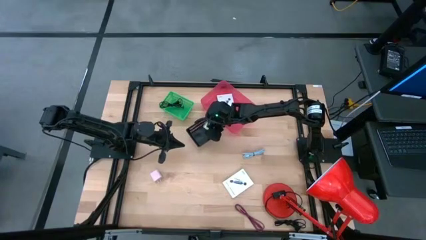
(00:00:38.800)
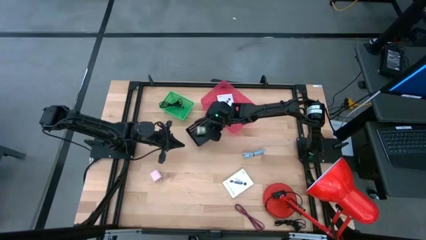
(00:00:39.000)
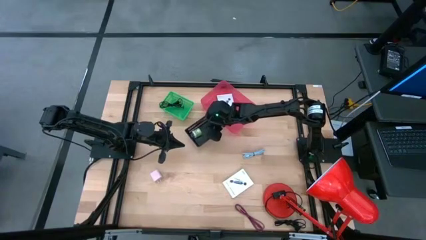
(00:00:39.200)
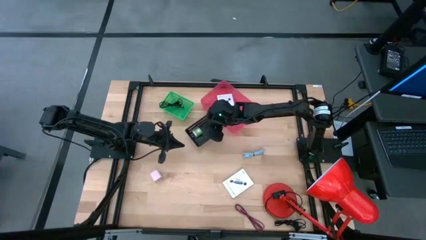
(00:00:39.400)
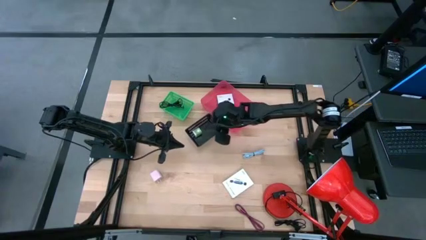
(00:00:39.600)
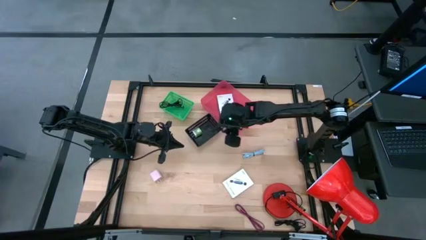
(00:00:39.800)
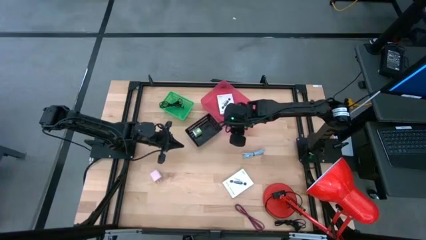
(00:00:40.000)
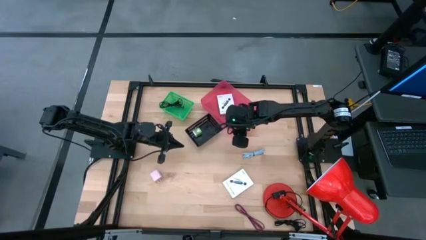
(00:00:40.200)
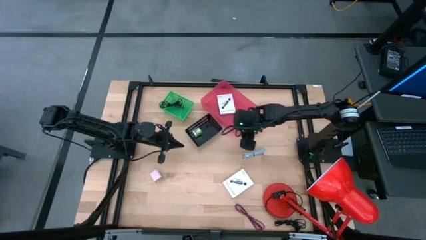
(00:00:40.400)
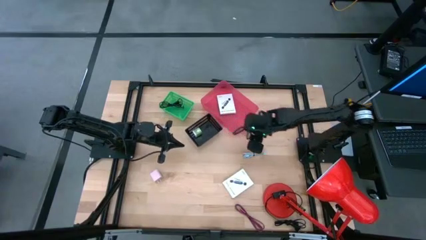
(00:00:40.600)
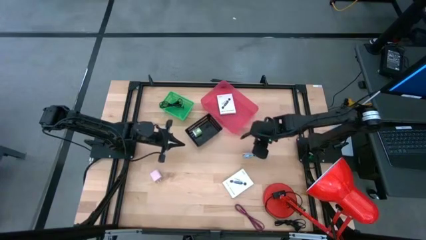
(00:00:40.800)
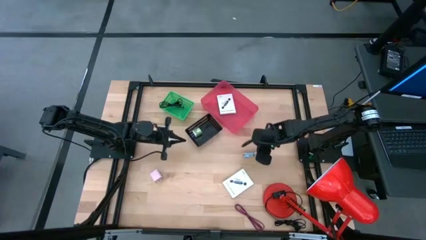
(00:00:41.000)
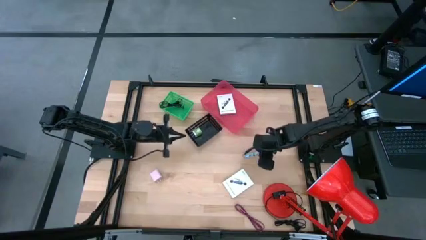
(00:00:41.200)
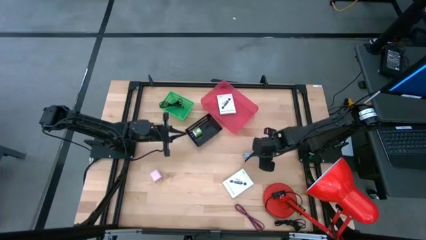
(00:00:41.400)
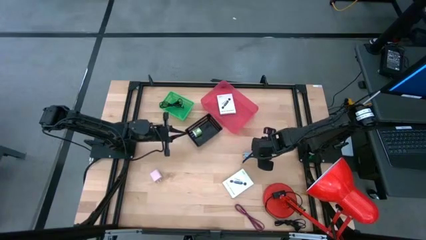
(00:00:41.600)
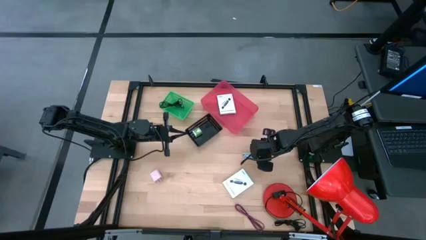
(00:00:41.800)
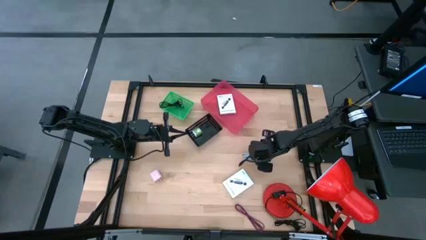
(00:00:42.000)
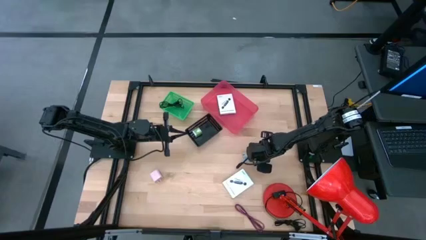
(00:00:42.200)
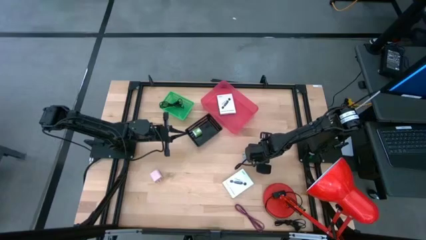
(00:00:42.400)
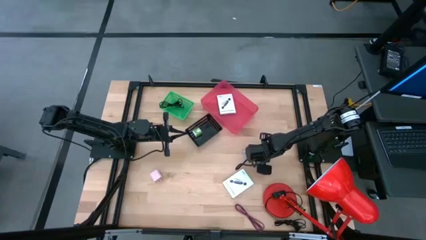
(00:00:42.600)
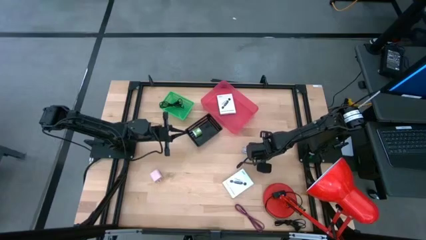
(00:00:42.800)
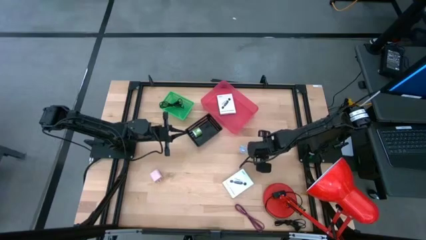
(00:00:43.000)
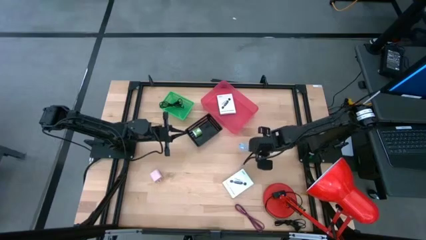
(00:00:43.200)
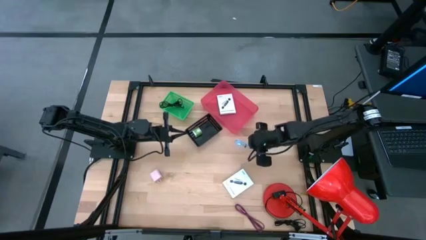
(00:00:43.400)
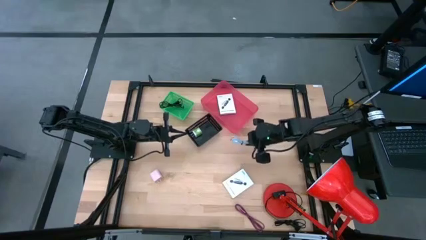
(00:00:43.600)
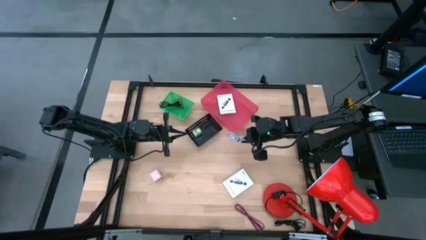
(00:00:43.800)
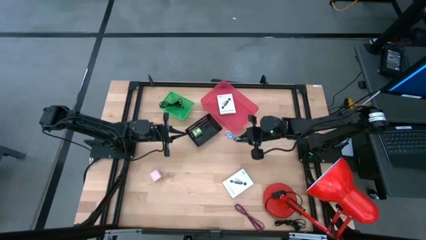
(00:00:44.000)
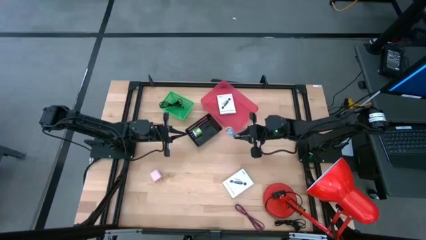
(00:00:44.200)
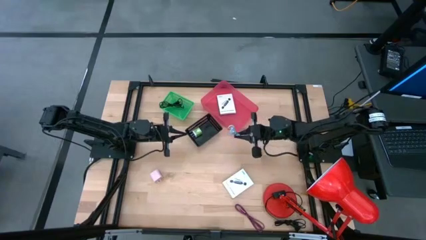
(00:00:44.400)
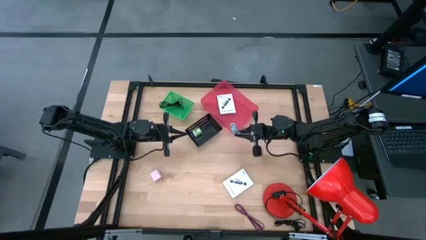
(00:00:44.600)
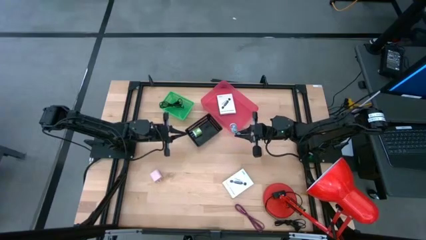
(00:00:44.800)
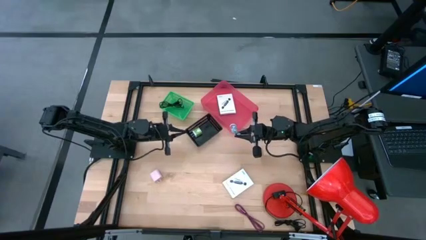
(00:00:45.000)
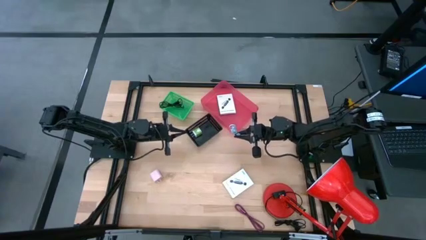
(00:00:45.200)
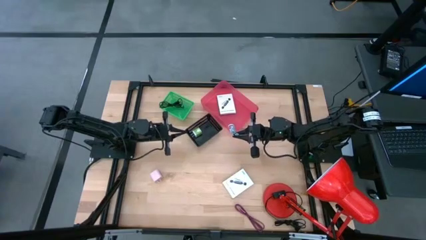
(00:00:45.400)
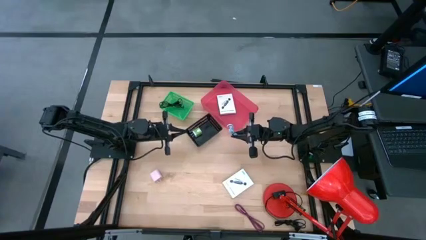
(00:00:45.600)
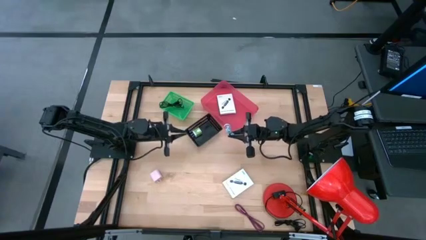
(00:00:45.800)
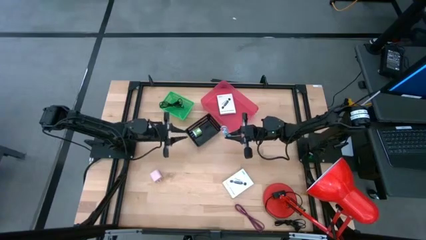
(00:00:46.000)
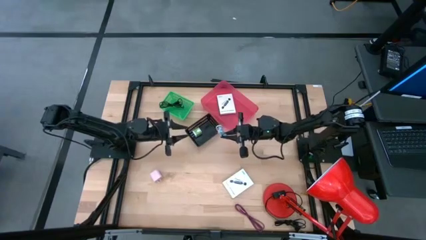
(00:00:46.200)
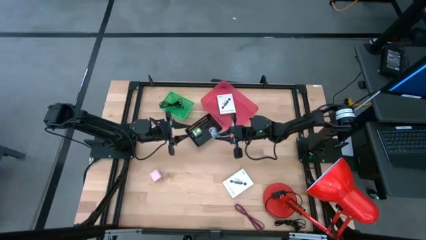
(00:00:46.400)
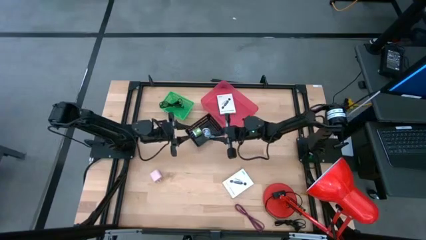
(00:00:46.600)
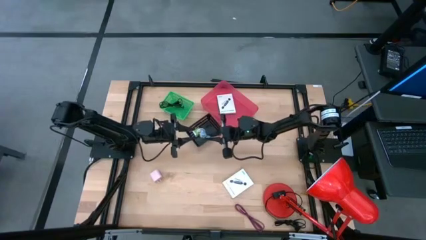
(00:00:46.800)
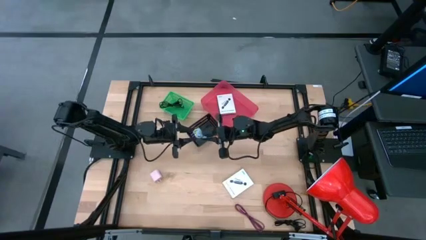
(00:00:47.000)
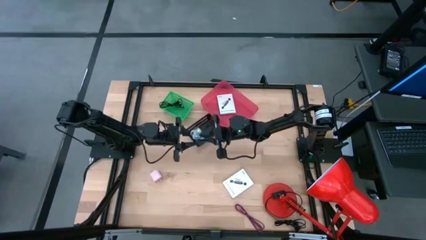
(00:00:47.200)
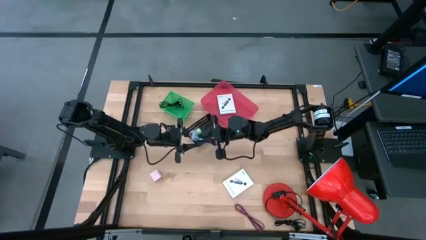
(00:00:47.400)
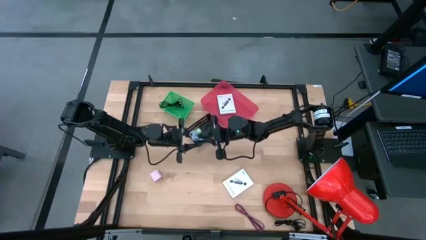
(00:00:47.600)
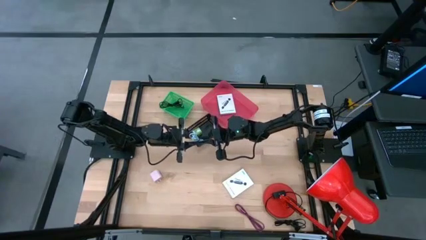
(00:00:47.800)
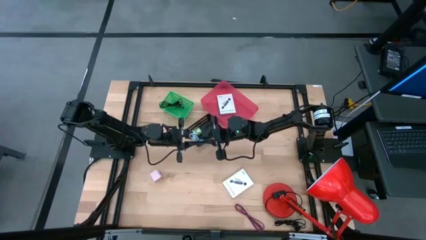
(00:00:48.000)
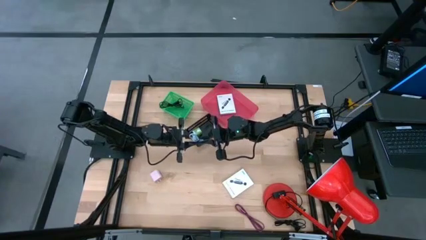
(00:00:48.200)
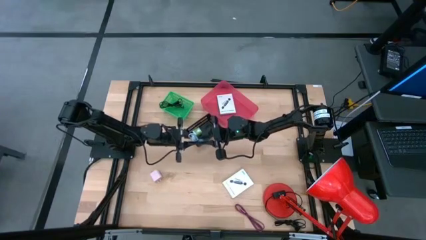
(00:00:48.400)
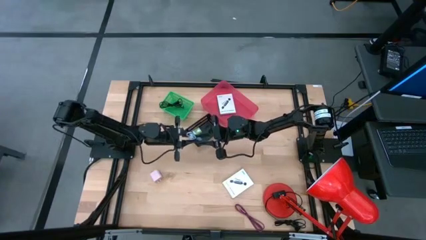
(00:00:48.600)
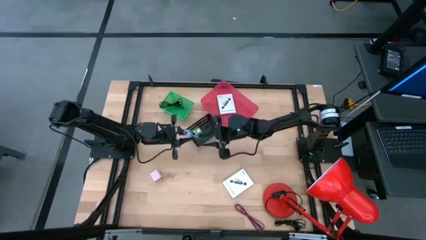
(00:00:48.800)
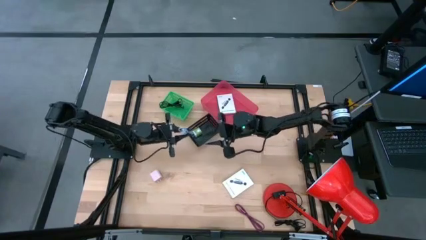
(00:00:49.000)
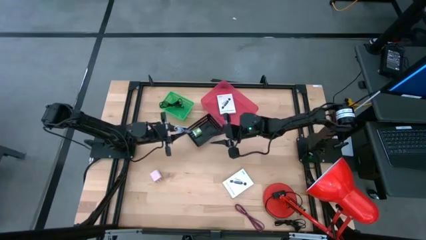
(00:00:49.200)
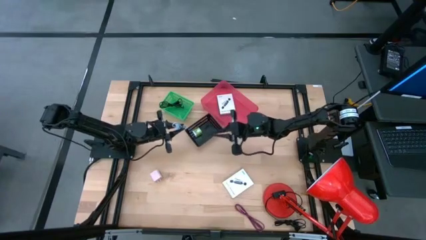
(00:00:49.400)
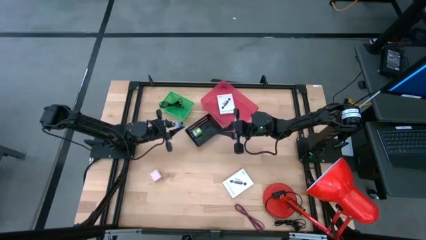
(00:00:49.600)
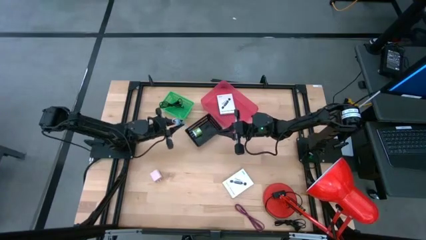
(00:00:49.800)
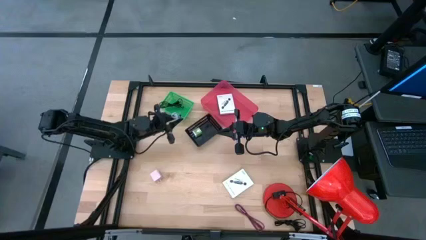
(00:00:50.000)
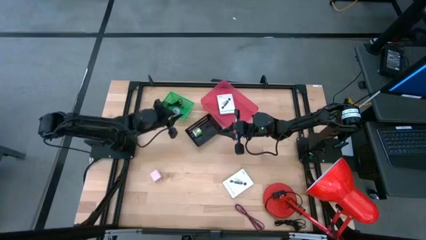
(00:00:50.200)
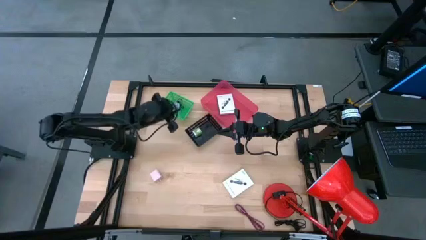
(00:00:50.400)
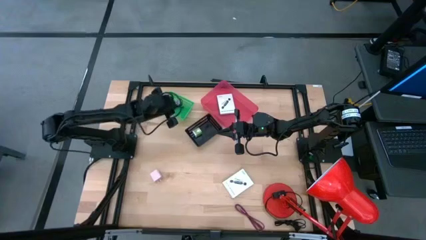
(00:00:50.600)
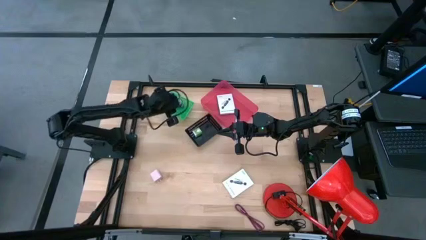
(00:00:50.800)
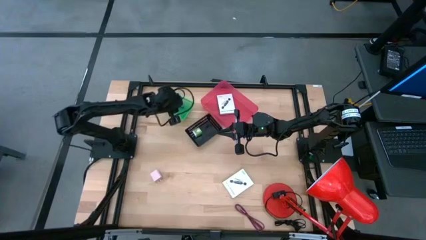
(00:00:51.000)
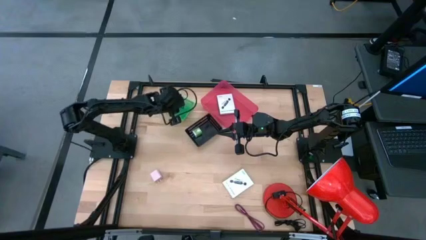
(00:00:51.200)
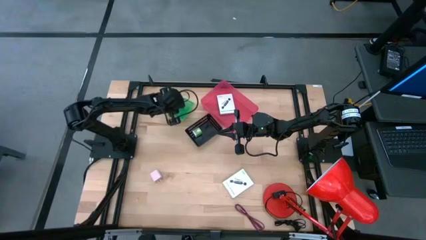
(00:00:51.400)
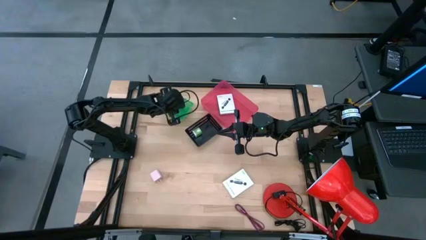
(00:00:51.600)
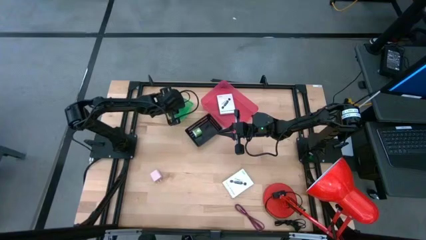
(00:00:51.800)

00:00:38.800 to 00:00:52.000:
Task: Pick and place items into bin
Put the blue charger cable into the green bin

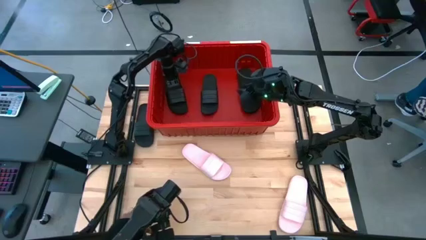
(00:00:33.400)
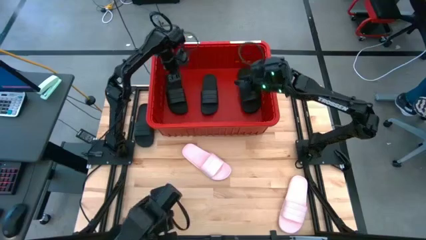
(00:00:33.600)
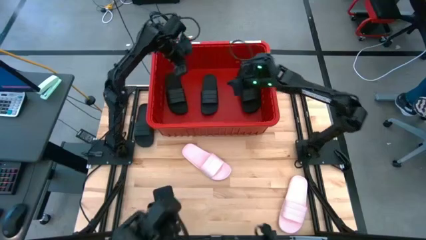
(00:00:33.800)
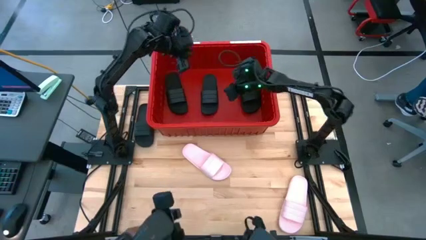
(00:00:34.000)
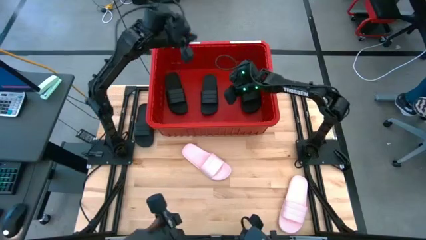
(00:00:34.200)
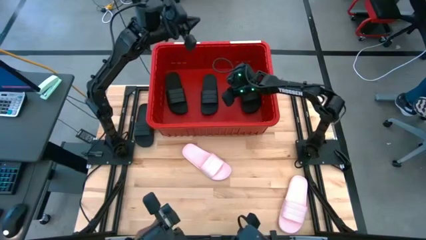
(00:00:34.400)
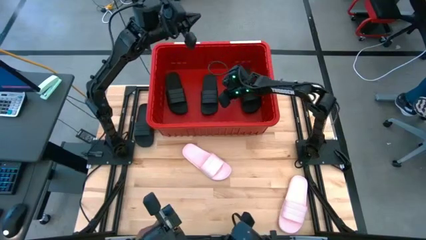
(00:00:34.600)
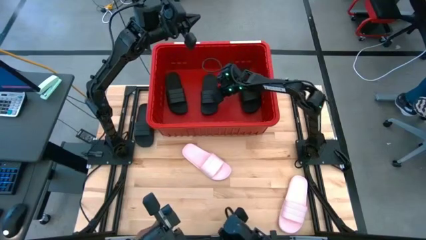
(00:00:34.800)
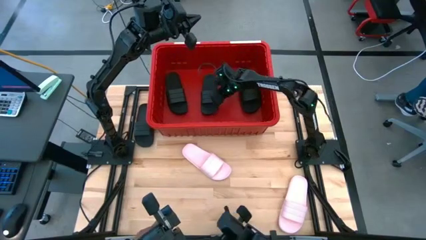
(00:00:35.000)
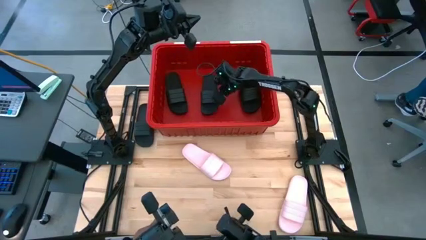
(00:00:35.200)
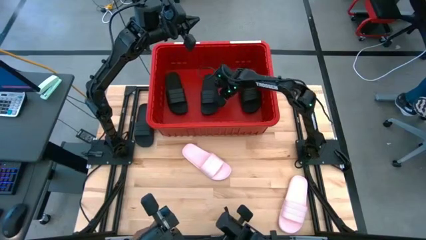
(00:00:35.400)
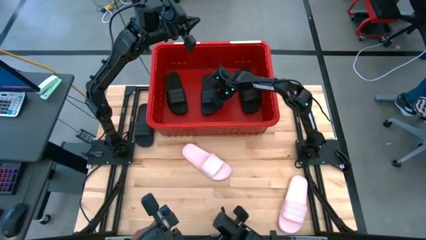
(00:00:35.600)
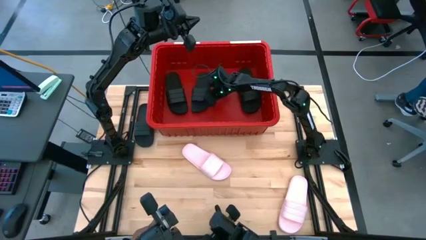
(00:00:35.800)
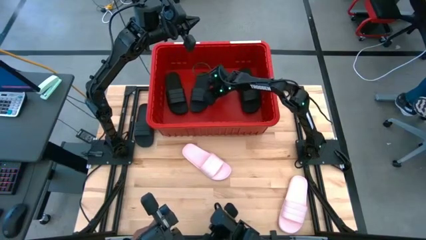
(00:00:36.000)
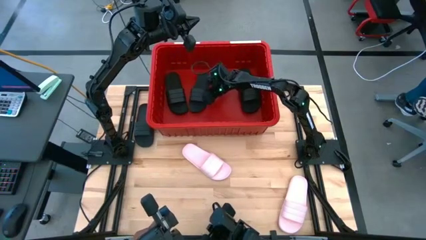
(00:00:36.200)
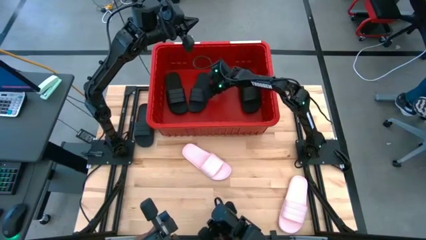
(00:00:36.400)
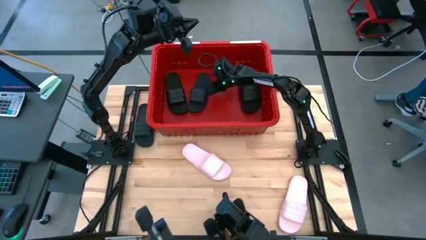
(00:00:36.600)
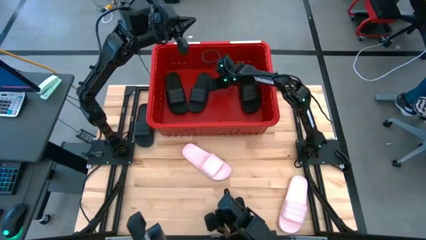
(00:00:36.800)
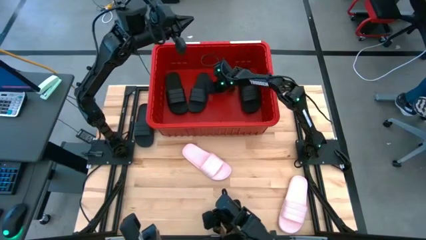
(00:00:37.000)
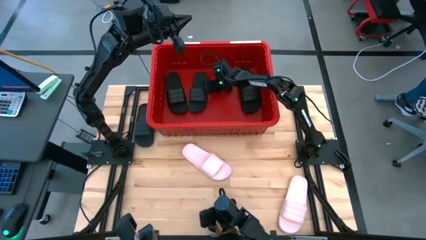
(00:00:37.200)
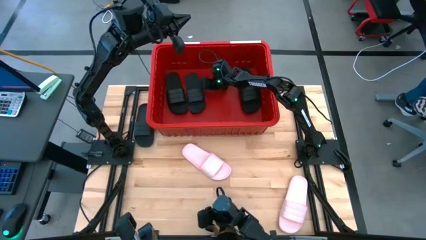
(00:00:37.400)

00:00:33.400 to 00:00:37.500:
Task: Pick and place slides into bin
Adjust the black slide in the red bin
